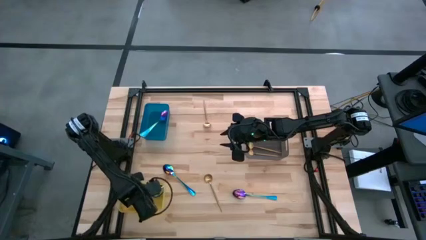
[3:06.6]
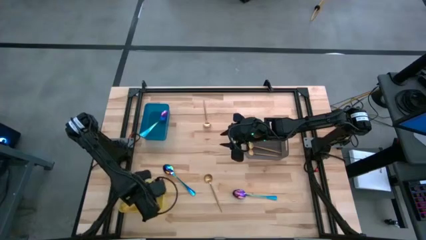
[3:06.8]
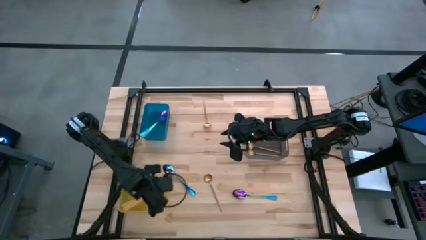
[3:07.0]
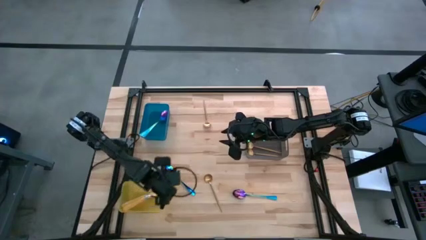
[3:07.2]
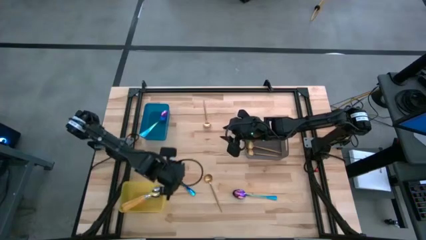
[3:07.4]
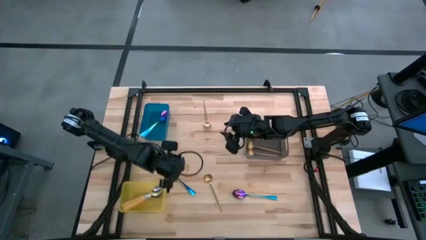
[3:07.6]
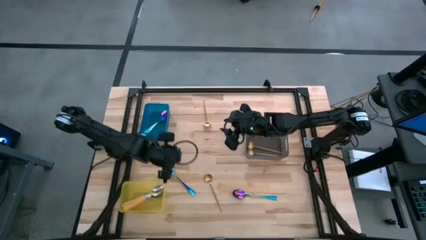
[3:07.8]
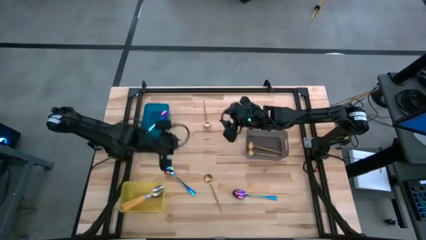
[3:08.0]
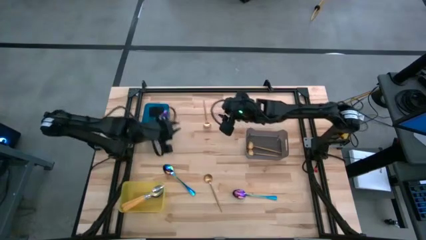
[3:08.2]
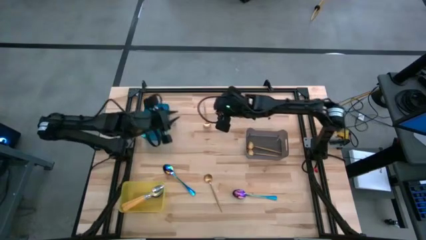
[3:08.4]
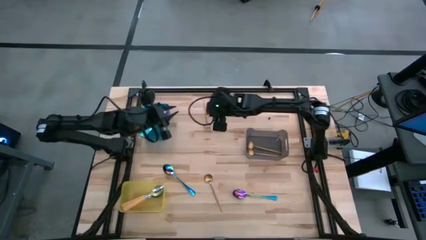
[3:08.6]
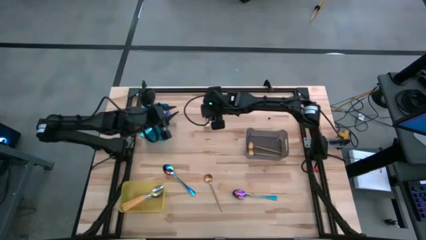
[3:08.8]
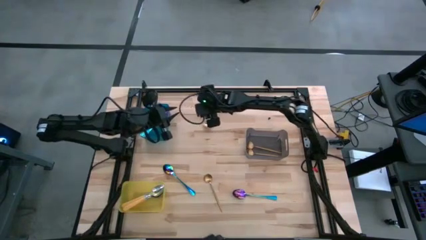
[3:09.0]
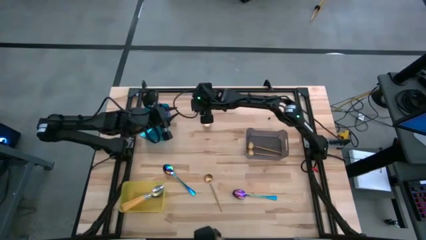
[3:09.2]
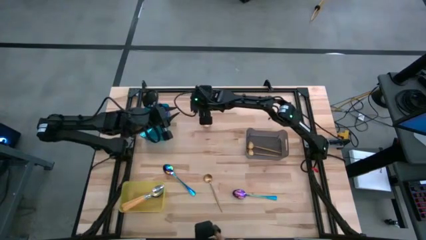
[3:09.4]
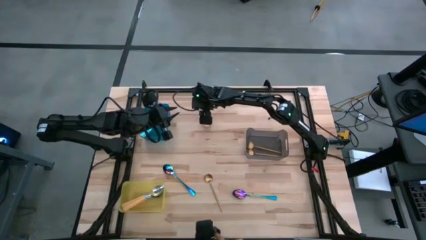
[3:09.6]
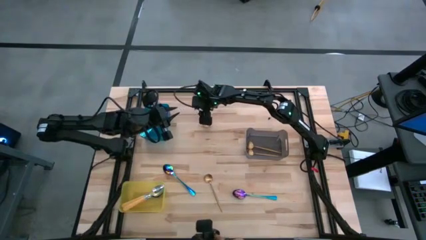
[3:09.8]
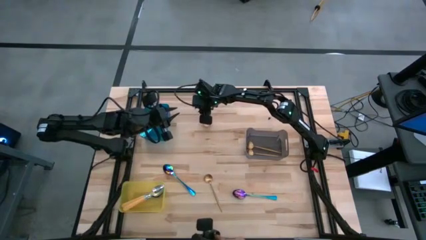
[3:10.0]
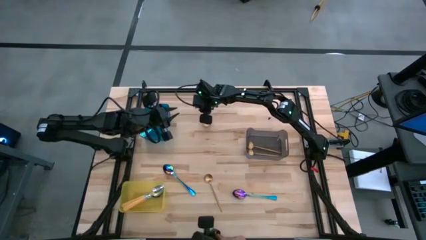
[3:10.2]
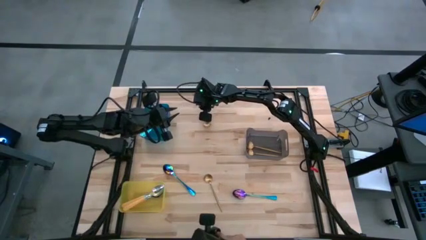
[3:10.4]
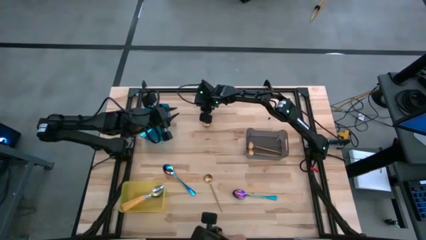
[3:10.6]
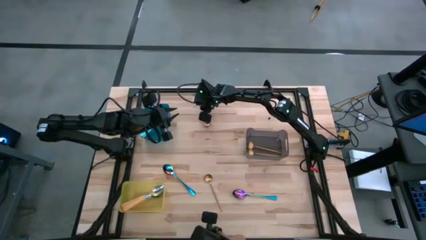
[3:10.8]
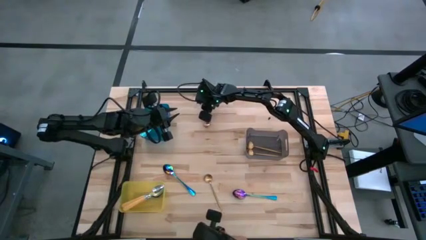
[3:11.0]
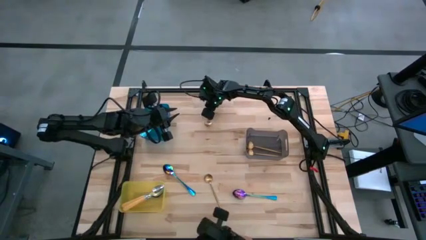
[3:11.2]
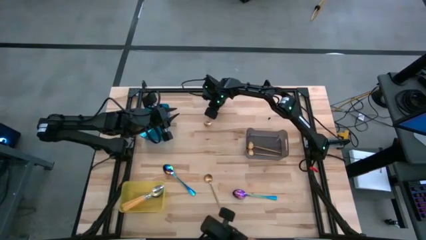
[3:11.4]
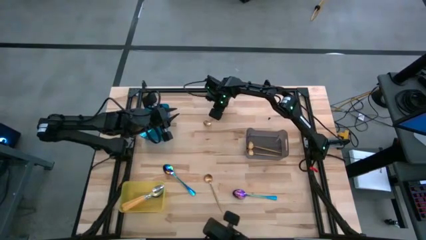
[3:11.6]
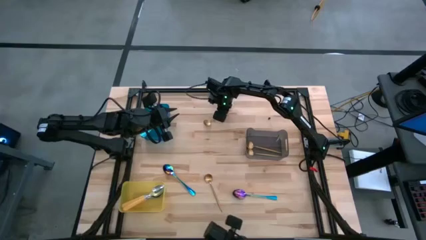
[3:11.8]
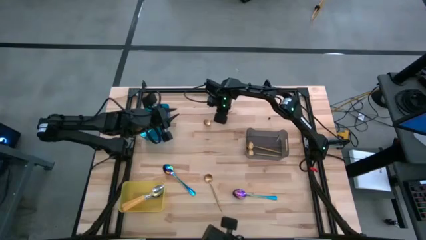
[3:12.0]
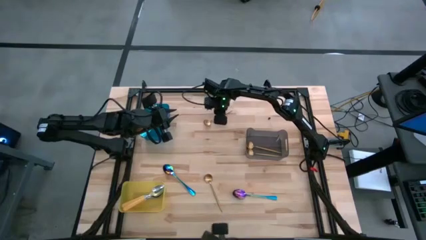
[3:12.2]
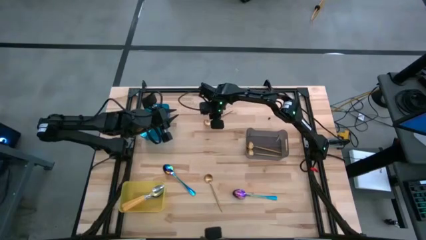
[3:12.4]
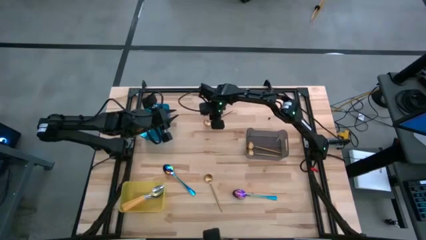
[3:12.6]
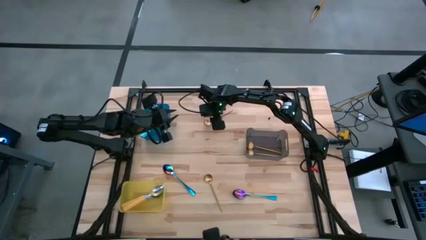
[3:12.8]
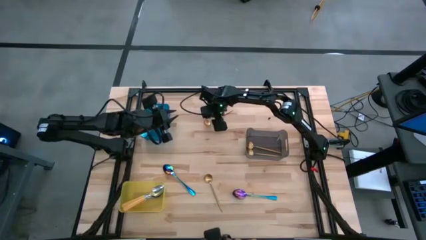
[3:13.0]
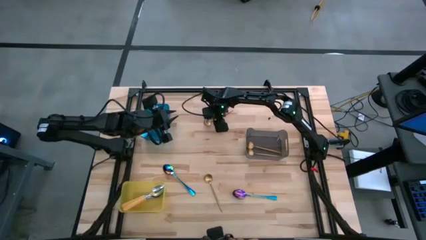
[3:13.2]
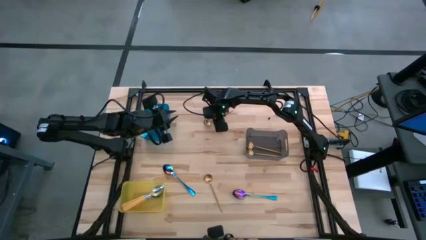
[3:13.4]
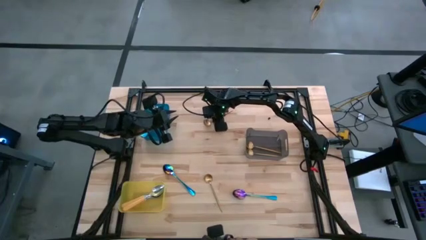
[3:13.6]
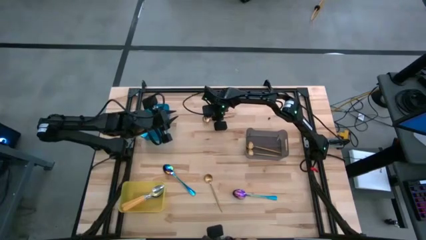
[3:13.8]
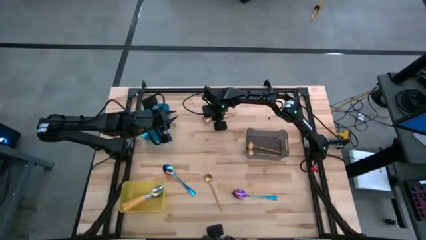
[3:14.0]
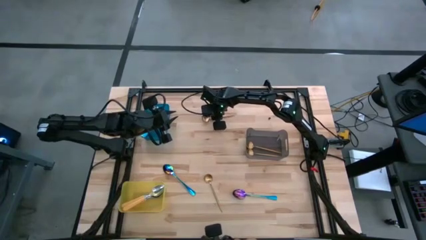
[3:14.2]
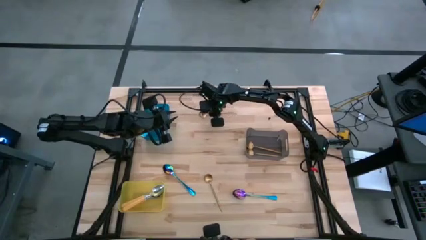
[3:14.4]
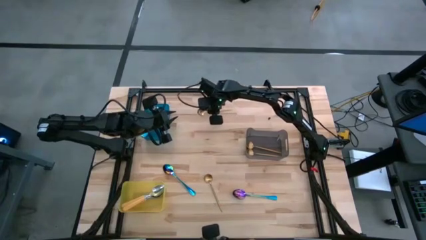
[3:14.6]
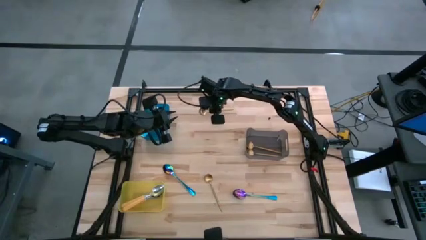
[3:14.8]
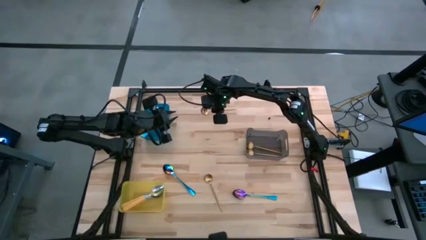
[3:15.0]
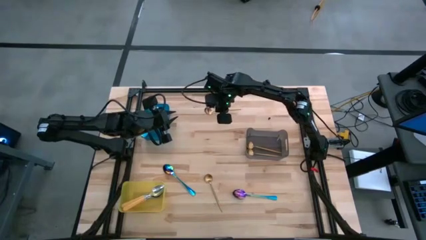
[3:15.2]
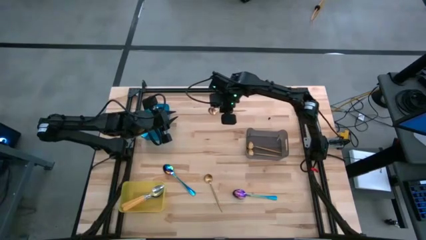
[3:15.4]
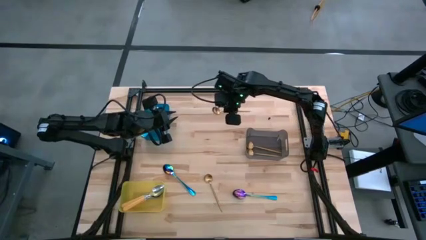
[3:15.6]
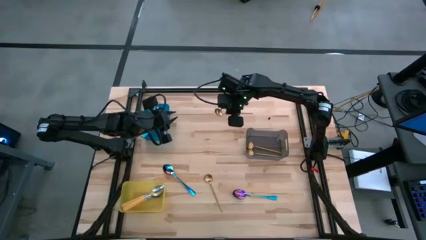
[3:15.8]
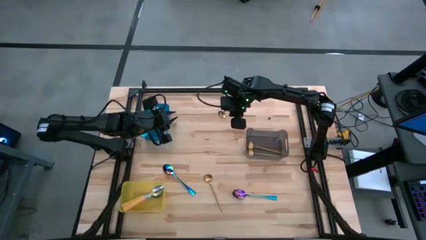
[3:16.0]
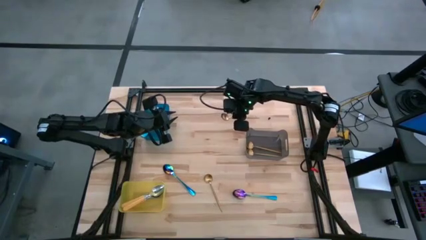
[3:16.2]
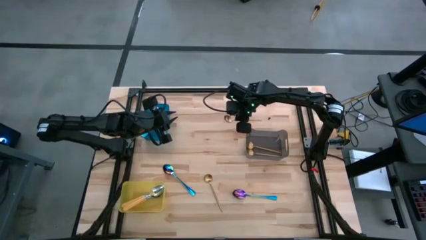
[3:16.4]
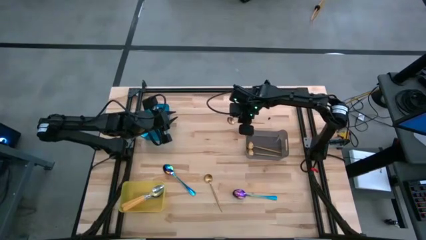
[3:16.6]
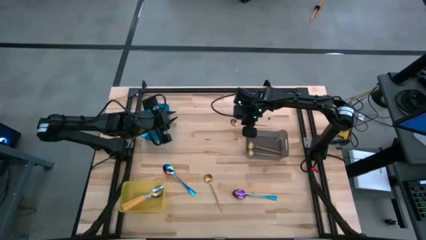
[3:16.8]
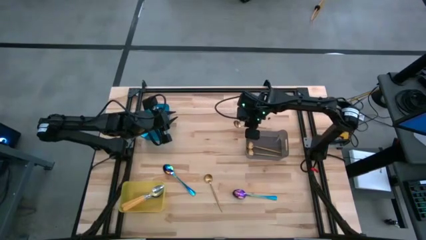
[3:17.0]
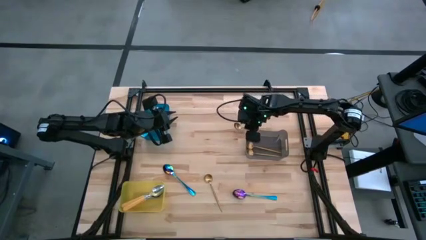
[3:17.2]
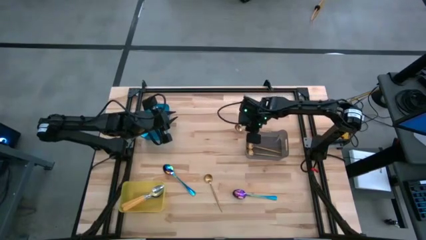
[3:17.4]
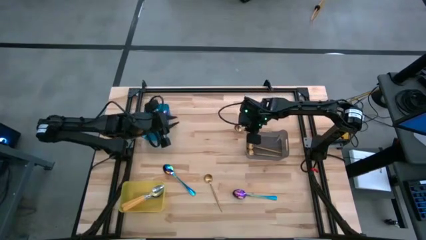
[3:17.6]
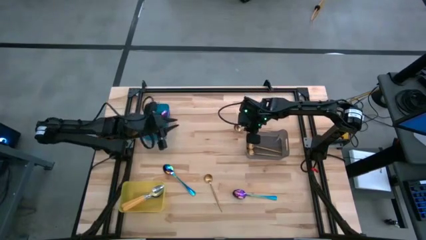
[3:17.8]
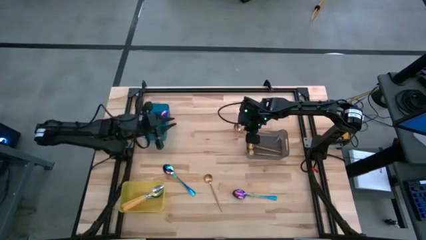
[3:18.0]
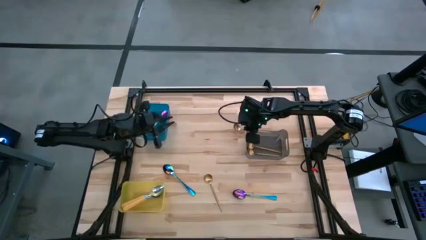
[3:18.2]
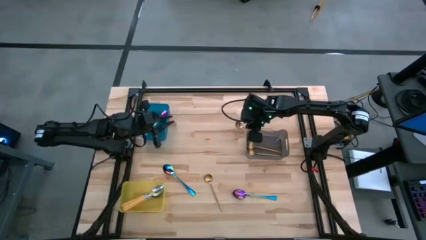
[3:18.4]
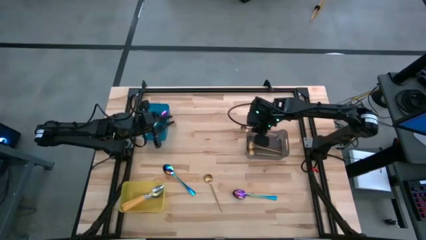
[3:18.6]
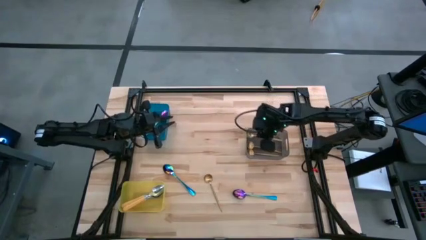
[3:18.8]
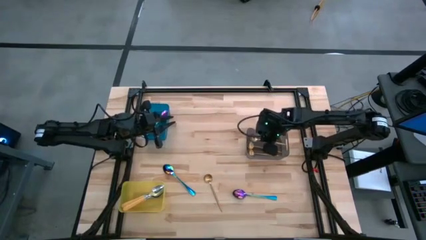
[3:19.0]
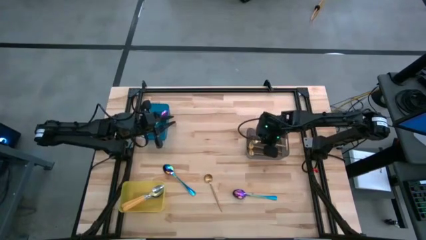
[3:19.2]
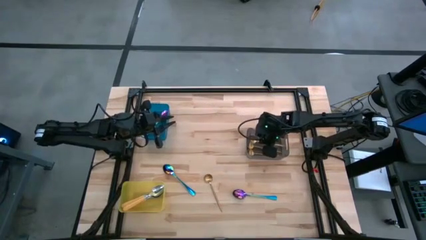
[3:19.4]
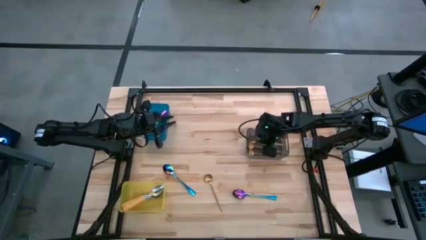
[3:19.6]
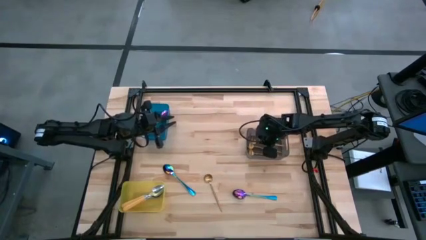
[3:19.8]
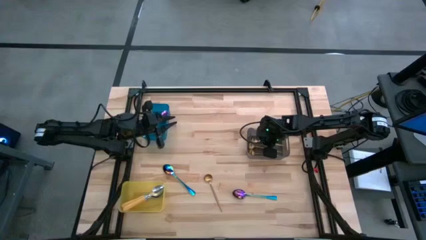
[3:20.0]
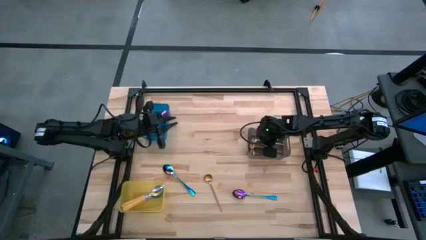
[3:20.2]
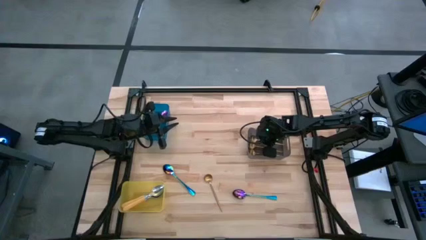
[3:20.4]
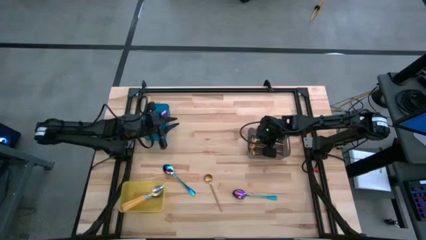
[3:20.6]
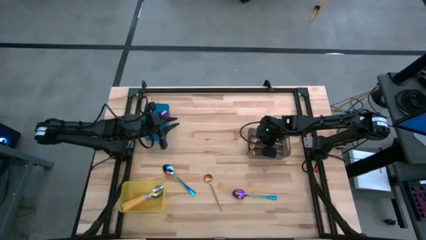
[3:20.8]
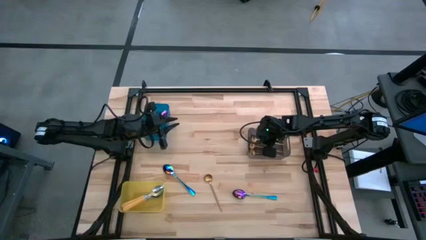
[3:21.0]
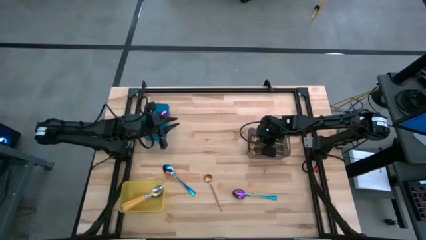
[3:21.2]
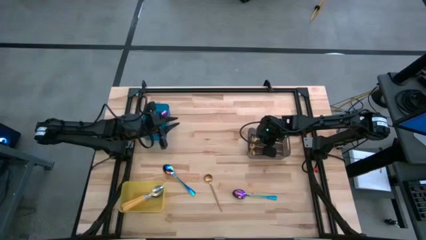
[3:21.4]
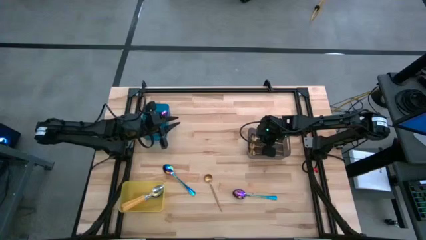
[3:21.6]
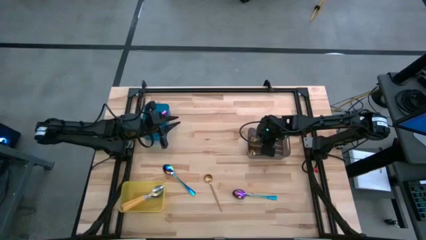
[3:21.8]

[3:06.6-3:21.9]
Task: Sort silverware by color (type)
Put the gold spoon into the black bin

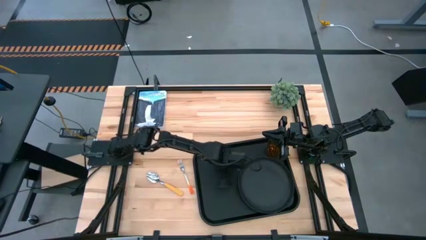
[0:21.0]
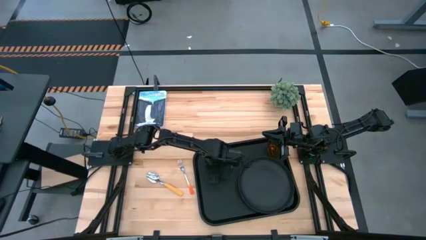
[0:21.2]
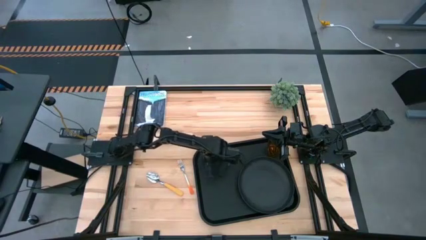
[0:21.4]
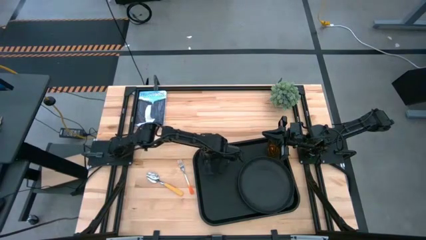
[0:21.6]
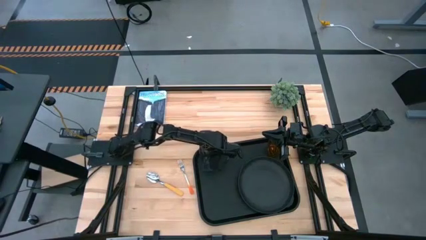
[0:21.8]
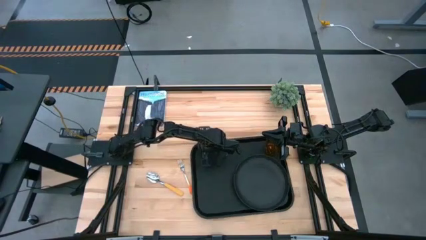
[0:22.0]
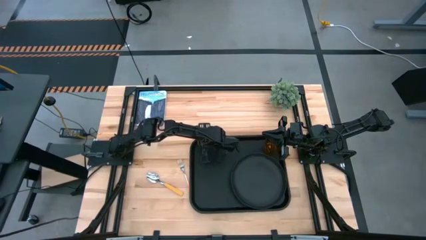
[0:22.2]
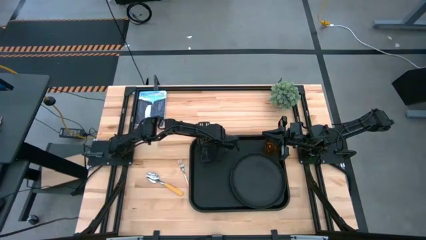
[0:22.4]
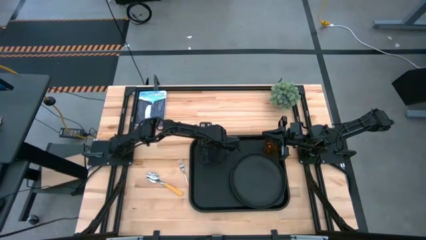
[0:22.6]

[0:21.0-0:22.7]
Task: Pick and place plate/cup/fork/spoon on tray
Adjust the black tray
